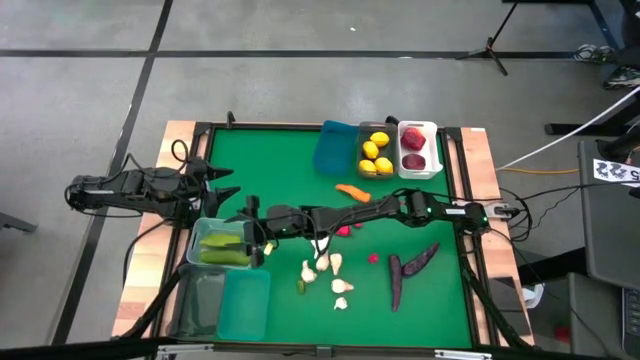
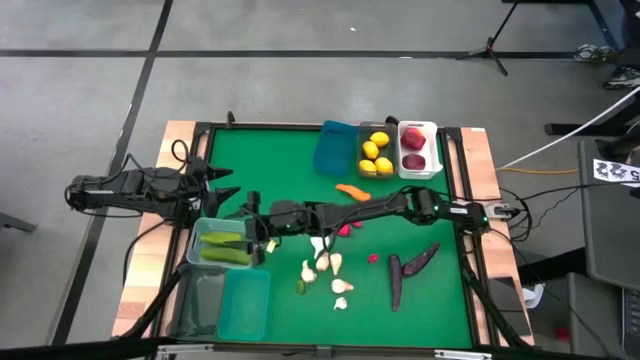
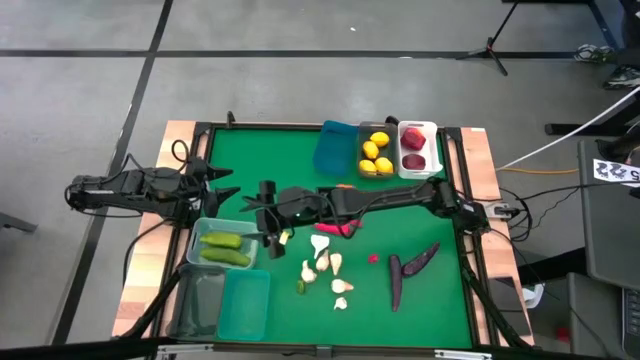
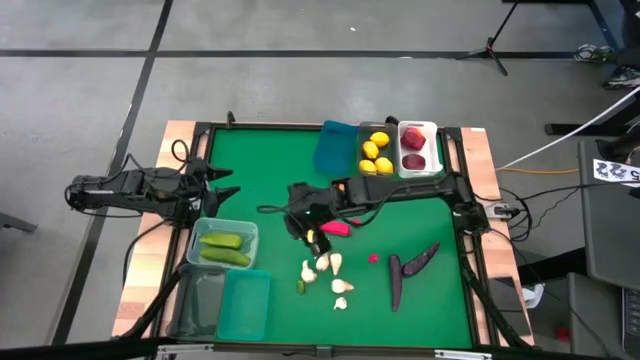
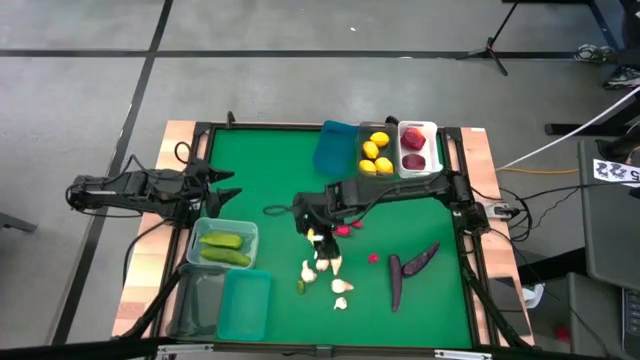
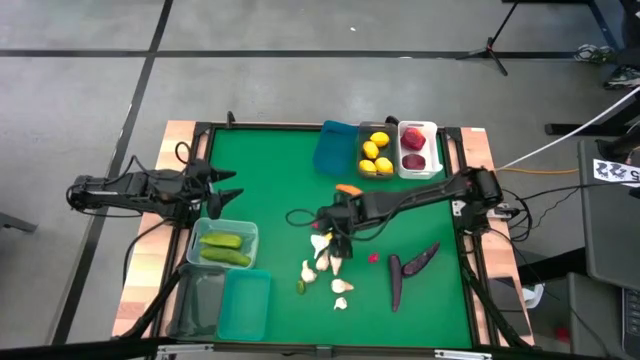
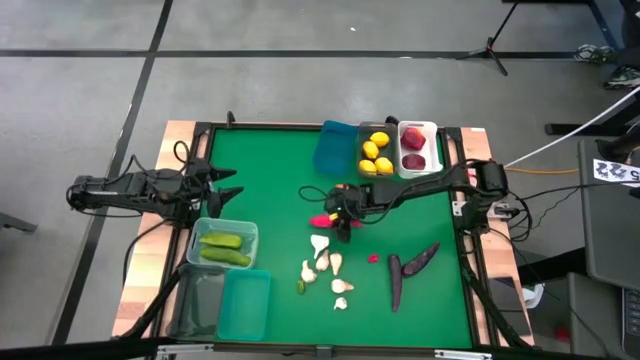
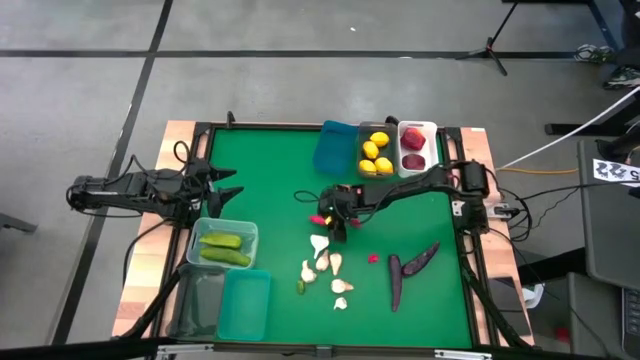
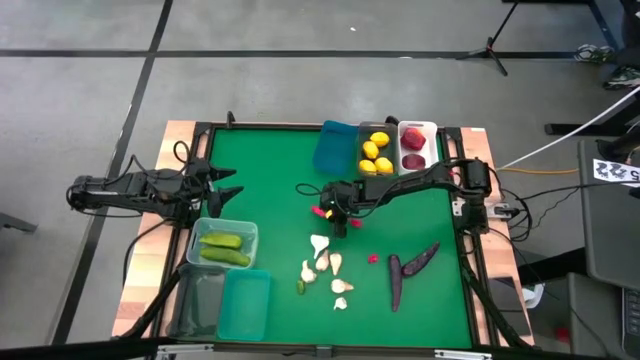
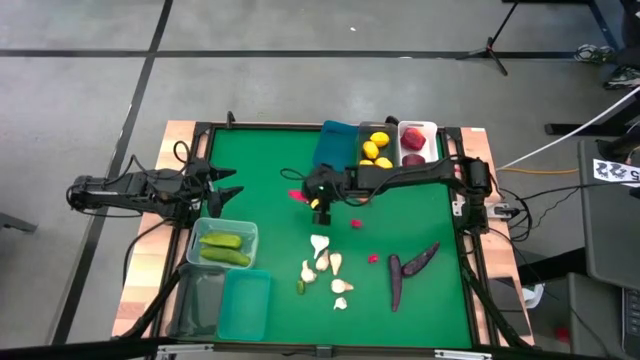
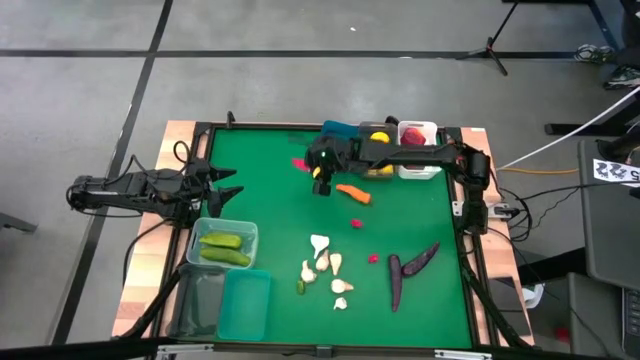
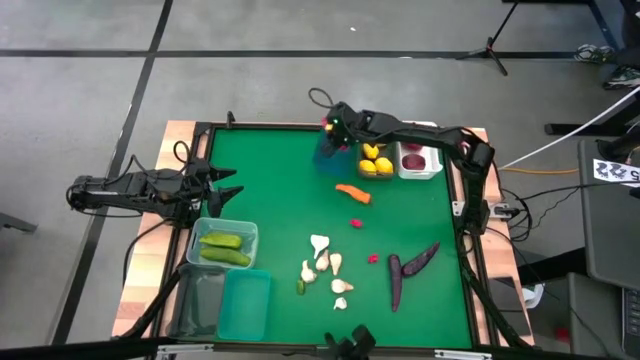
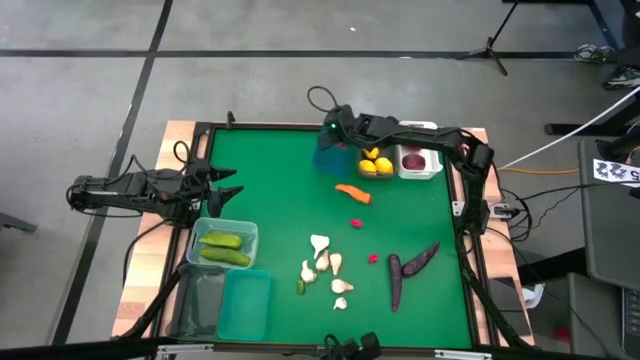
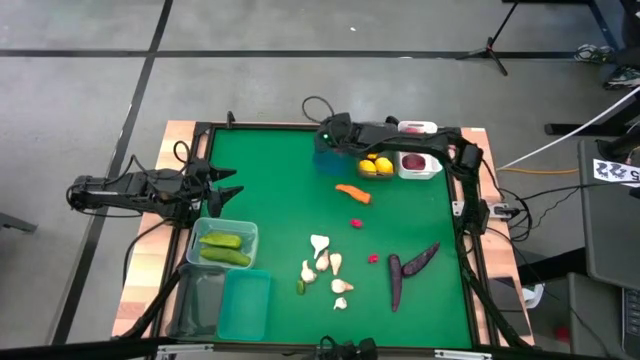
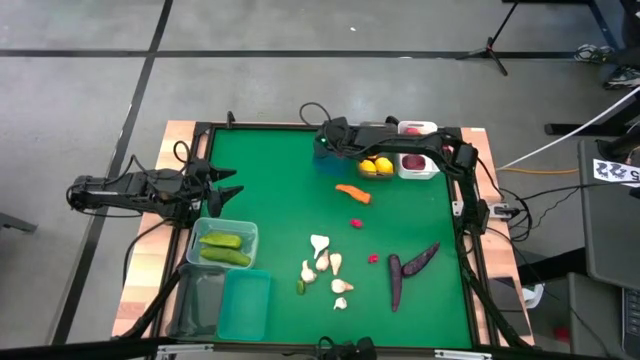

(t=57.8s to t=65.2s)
Task: Sort produce into baskets
Put the red chili paper into the blue bin

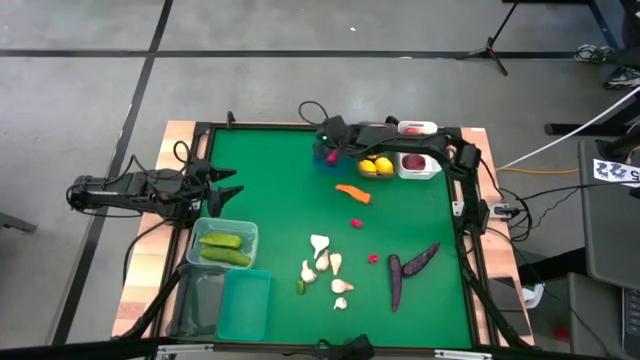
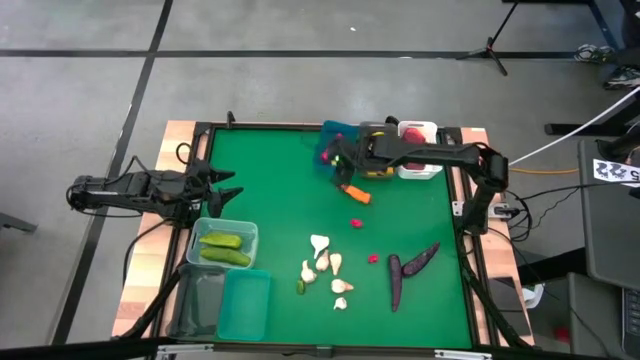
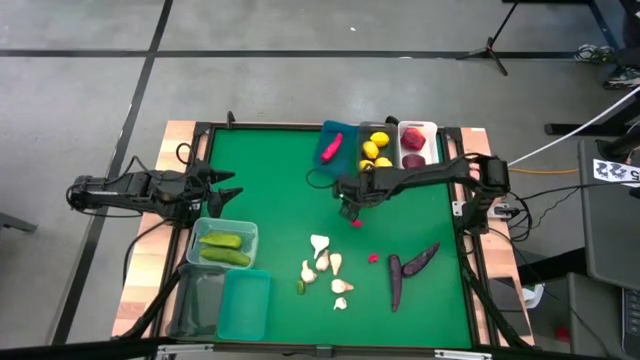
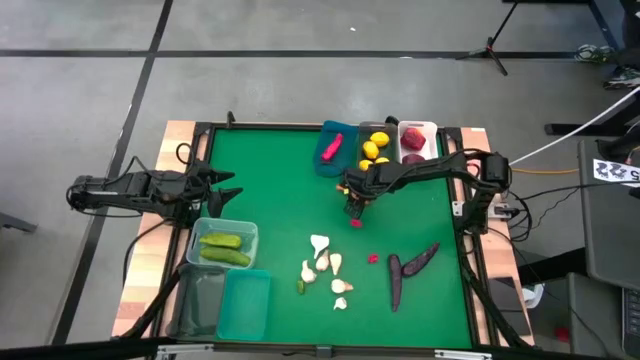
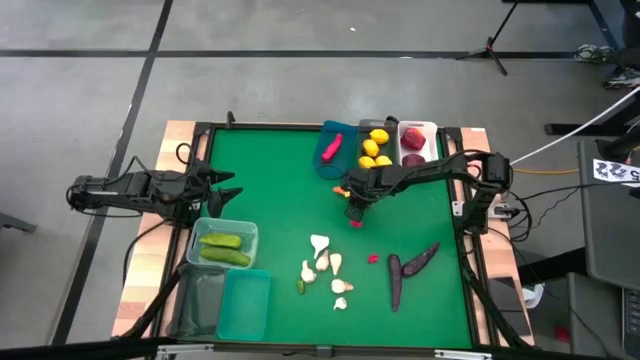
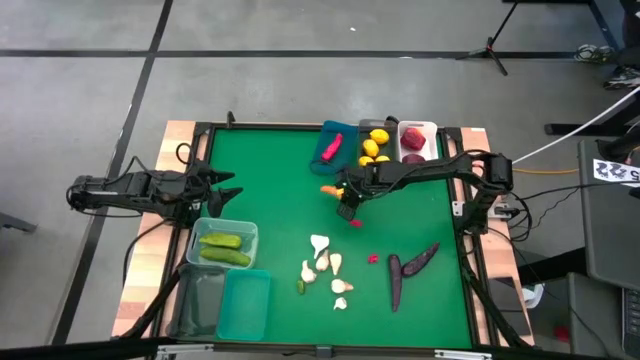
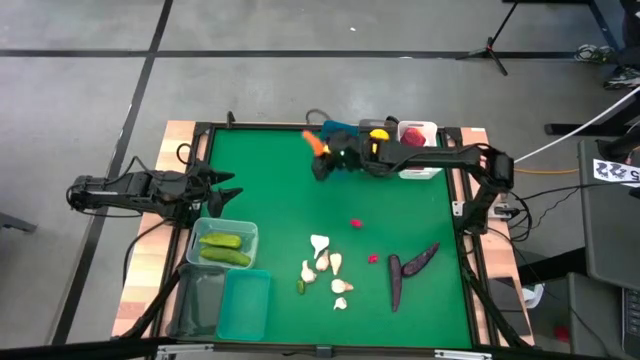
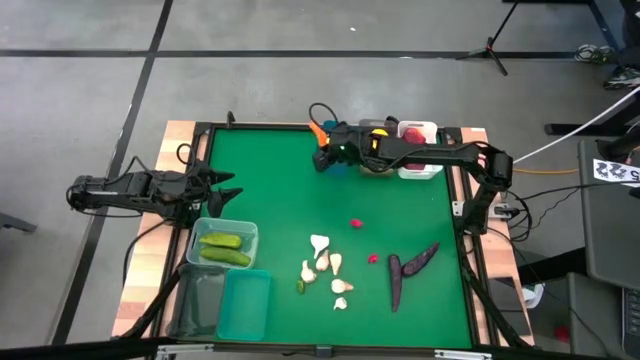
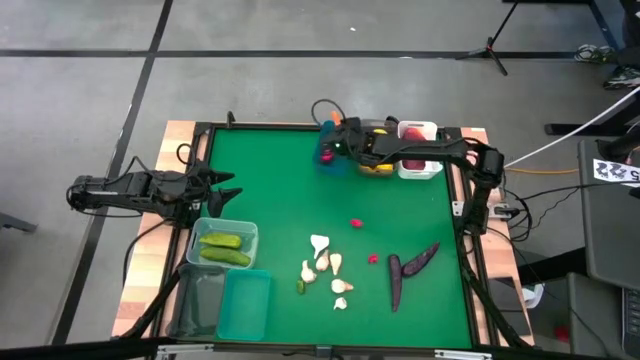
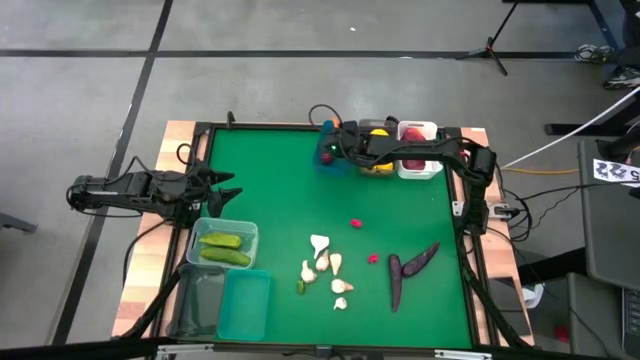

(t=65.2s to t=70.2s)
Put the orange chili paper into the blue bin

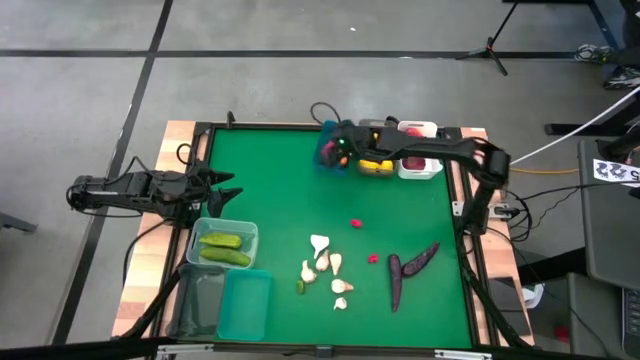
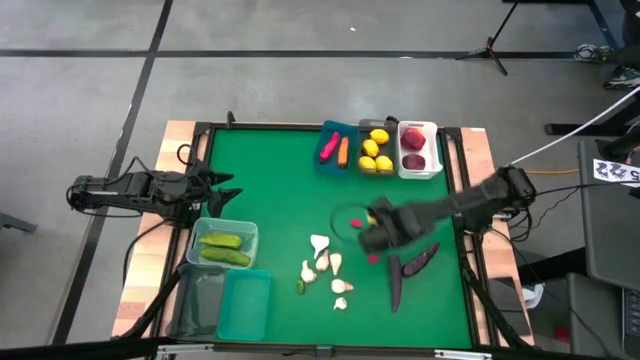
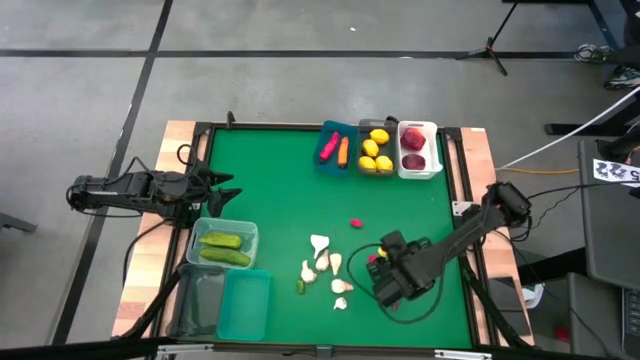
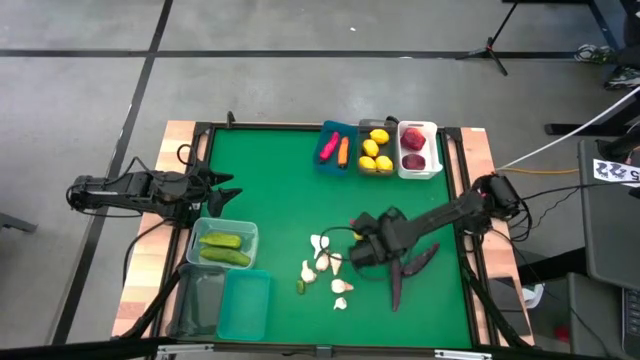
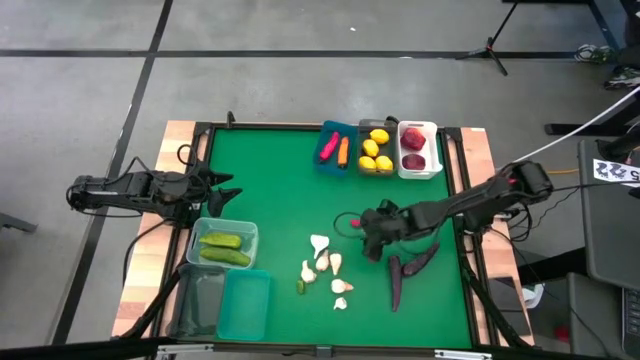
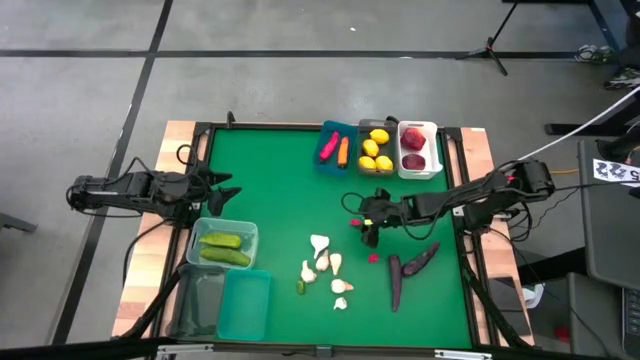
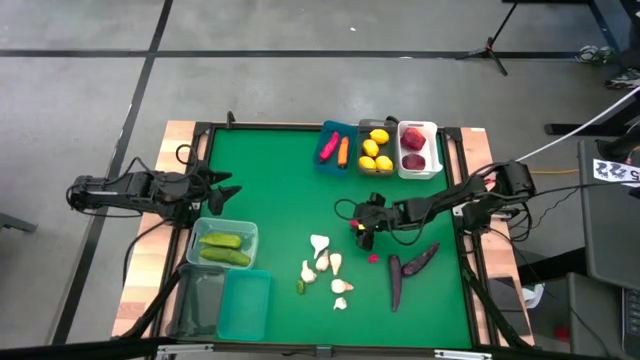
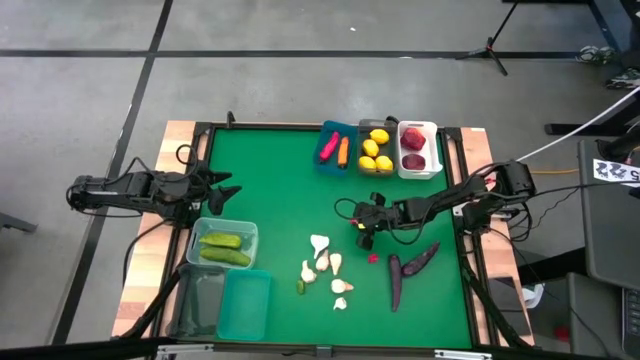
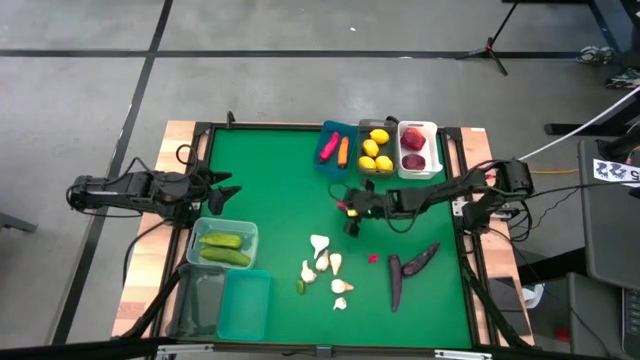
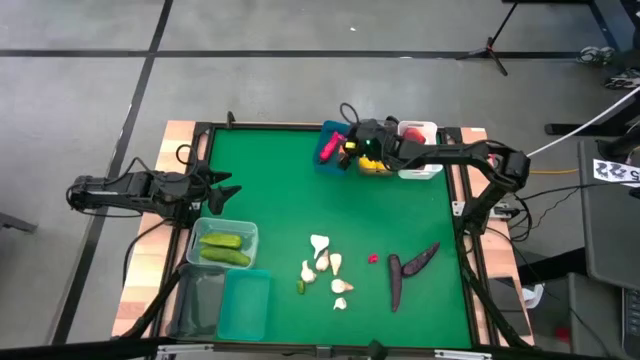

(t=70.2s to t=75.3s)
Put the red chili paper into the blue bin

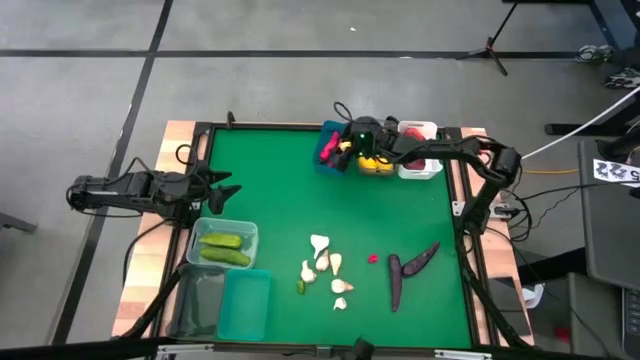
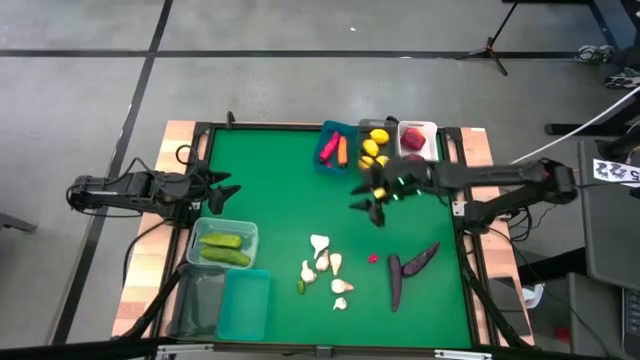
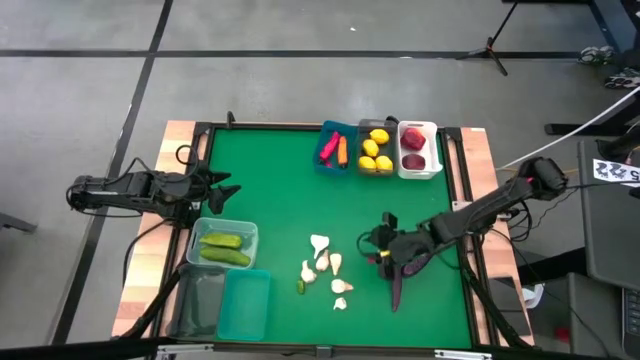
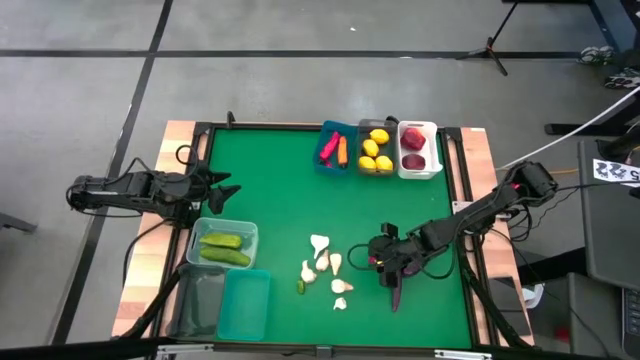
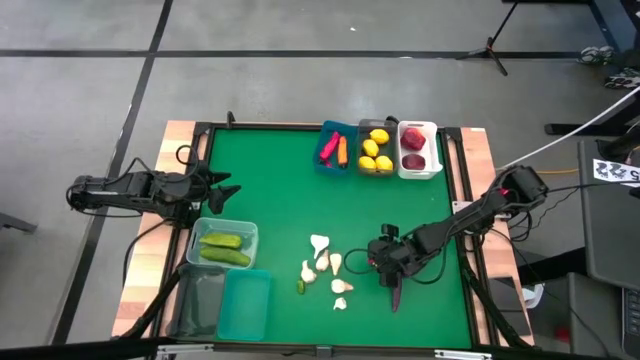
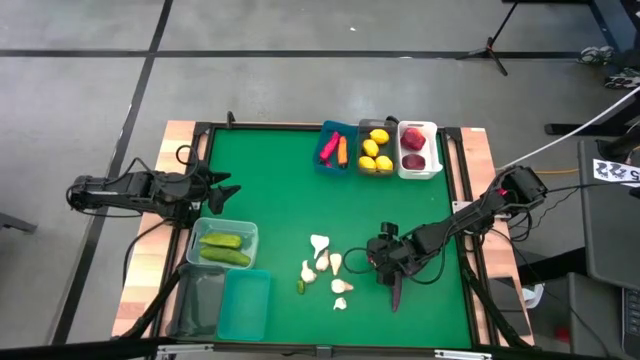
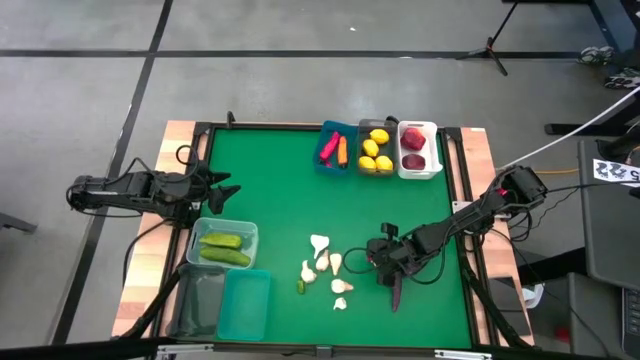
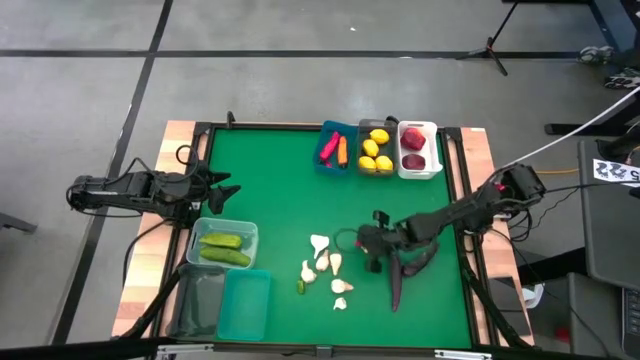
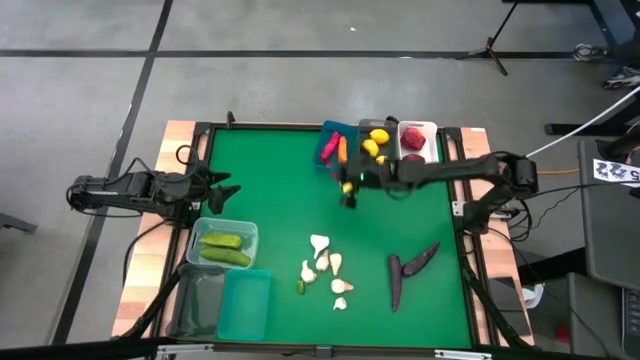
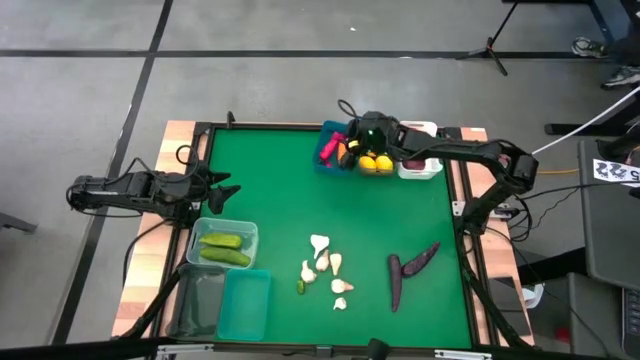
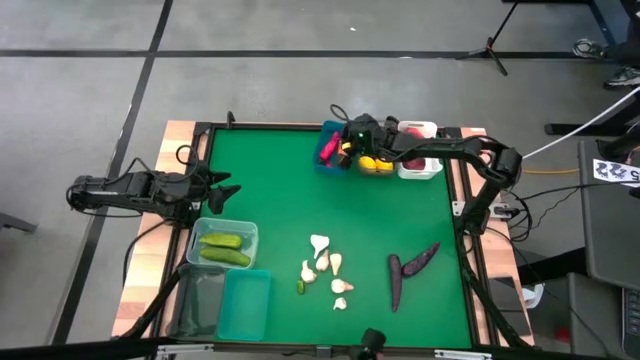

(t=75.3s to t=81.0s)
Put the red chili paper into the blue bin
